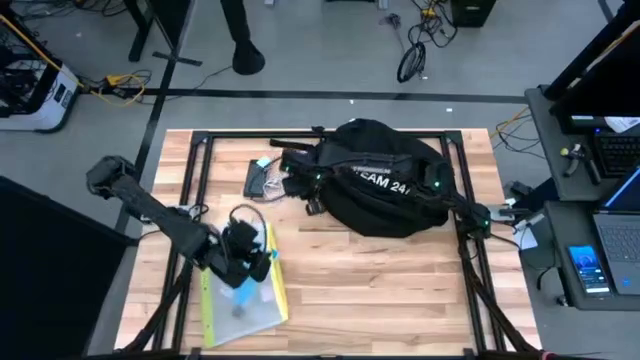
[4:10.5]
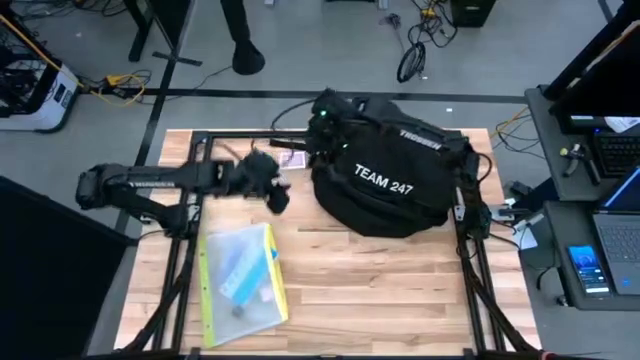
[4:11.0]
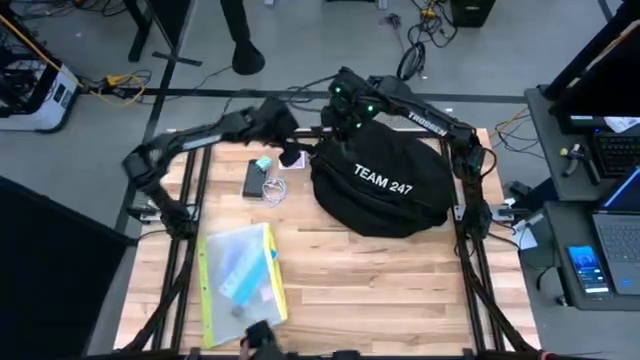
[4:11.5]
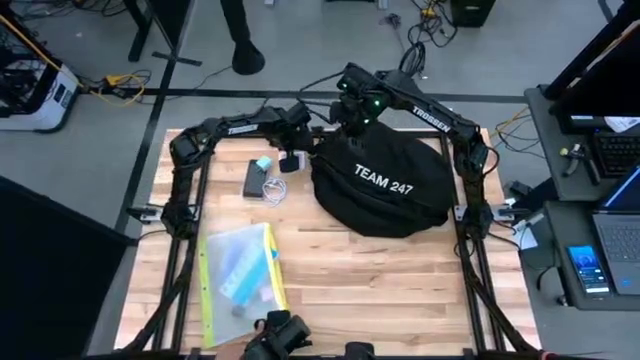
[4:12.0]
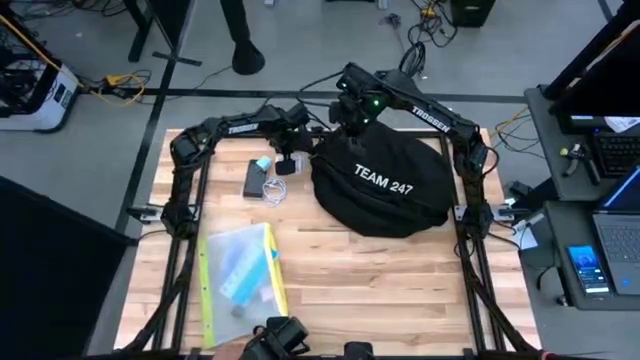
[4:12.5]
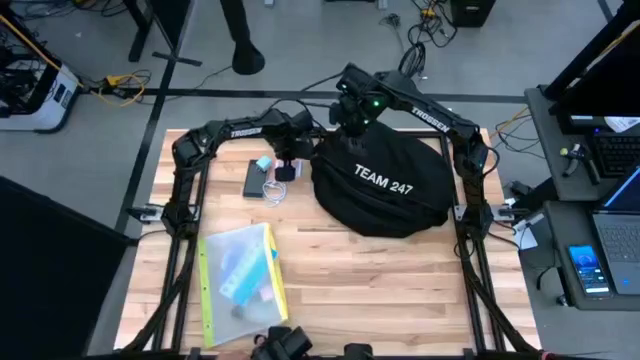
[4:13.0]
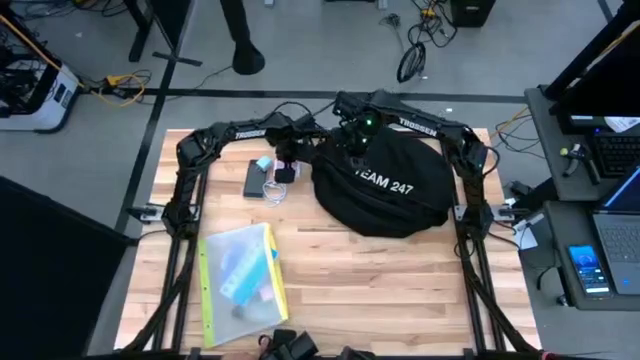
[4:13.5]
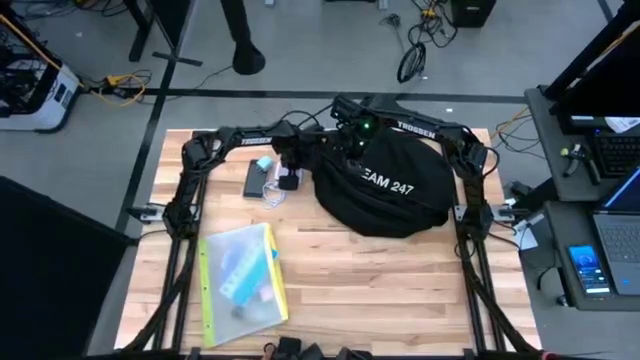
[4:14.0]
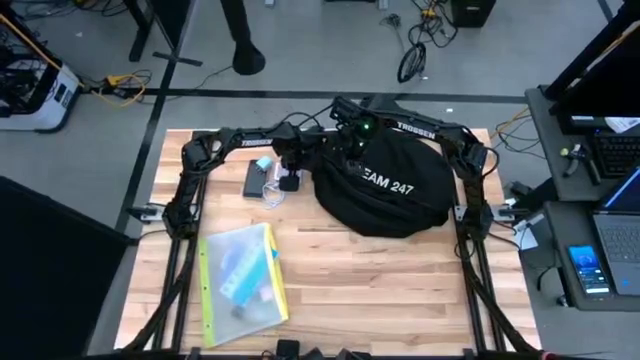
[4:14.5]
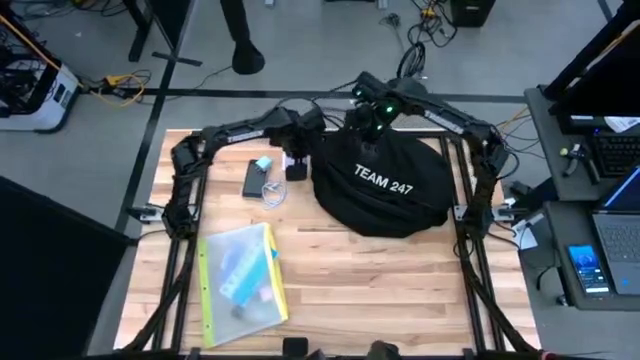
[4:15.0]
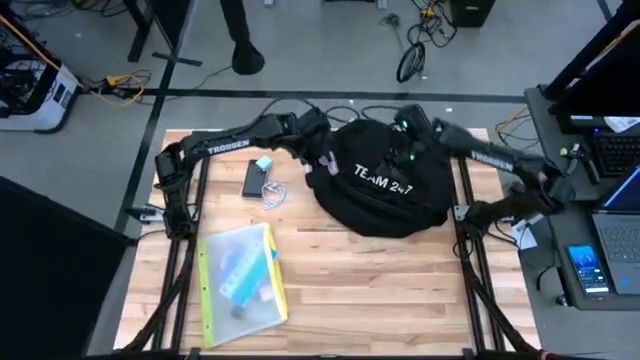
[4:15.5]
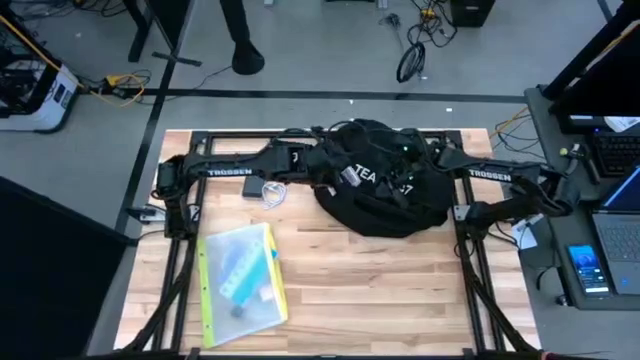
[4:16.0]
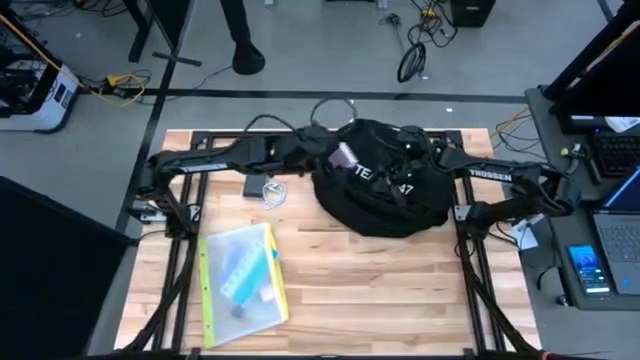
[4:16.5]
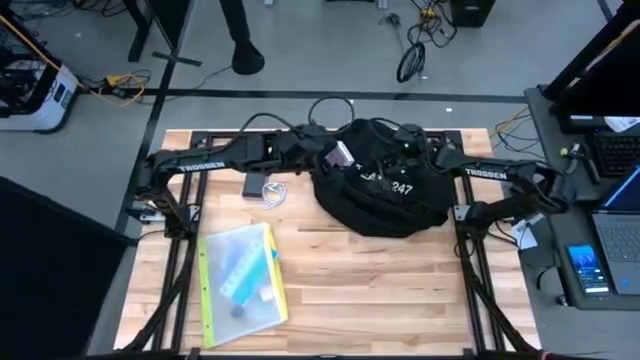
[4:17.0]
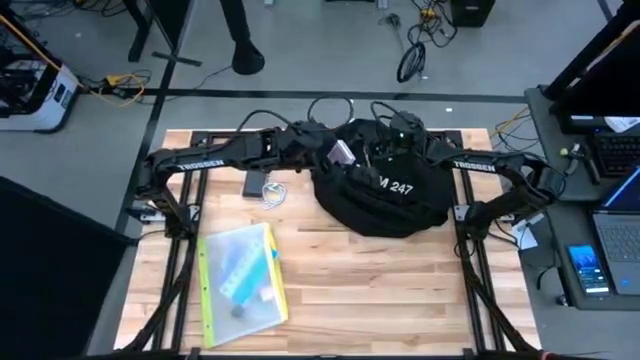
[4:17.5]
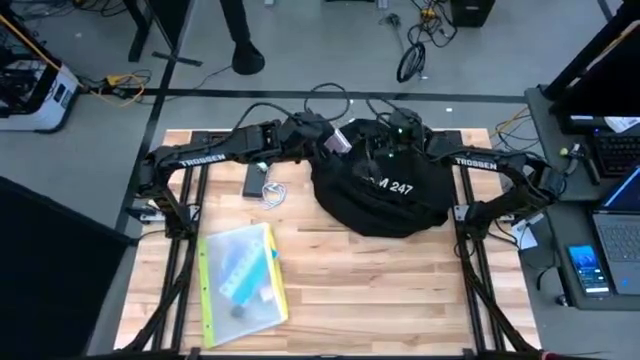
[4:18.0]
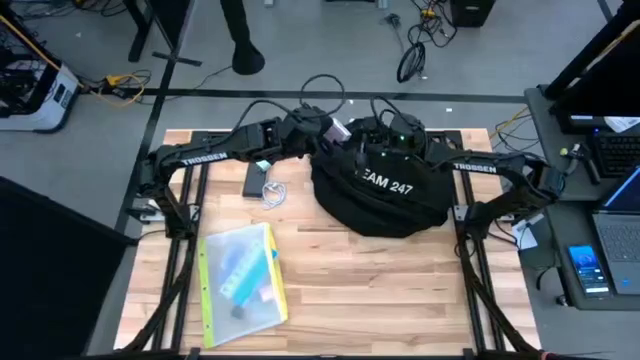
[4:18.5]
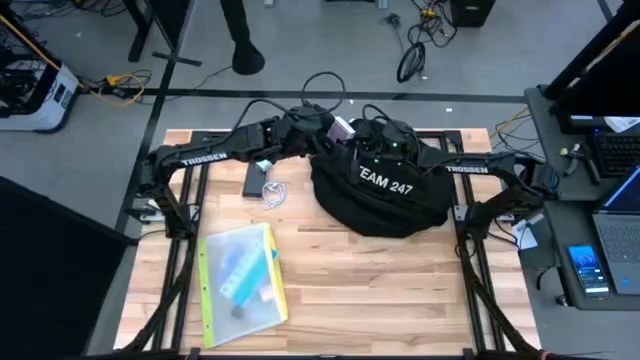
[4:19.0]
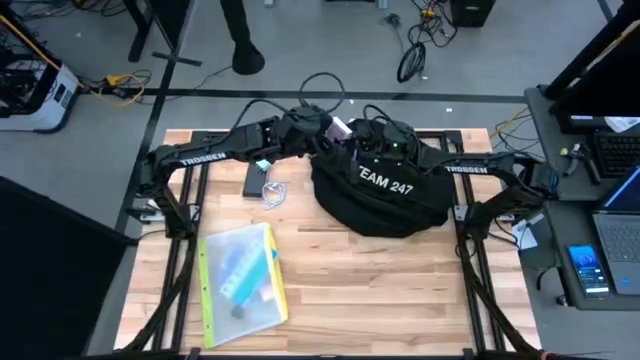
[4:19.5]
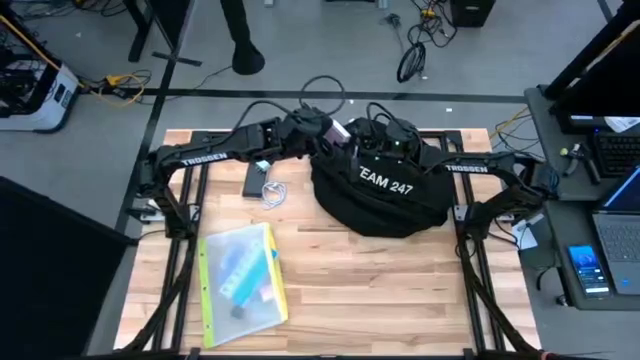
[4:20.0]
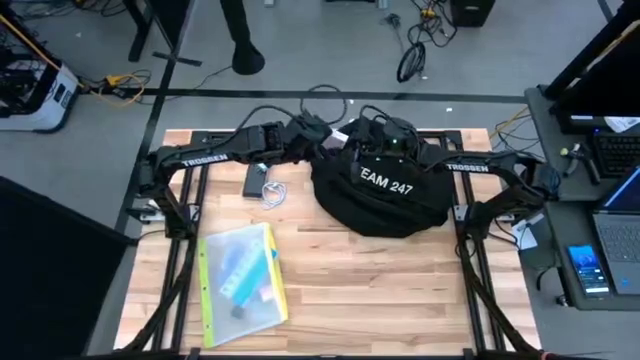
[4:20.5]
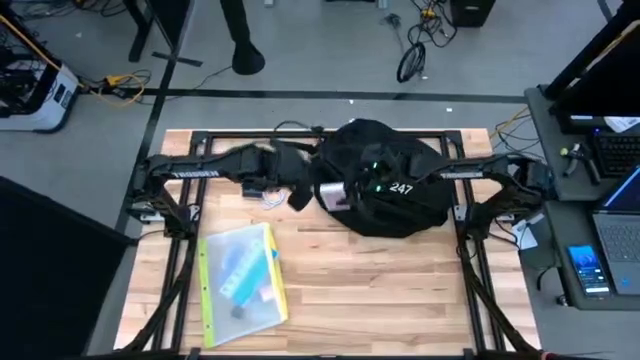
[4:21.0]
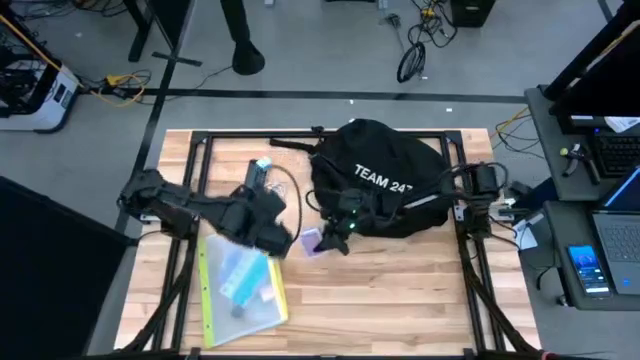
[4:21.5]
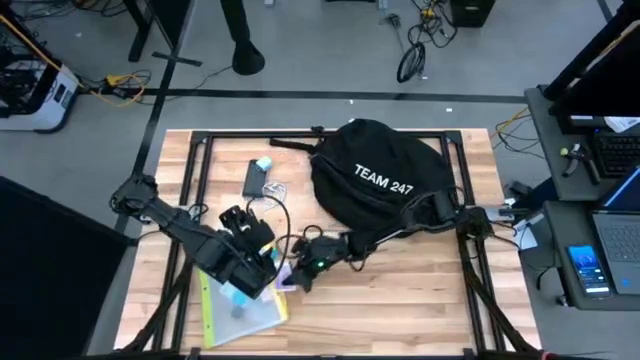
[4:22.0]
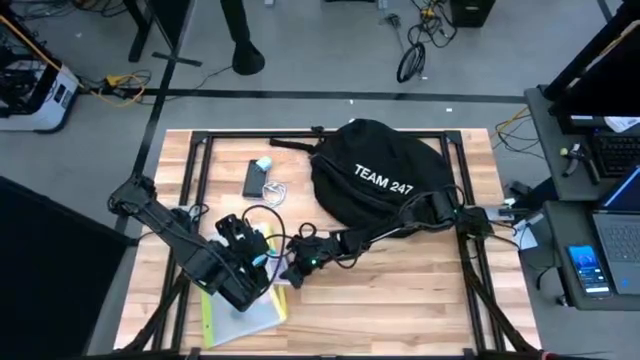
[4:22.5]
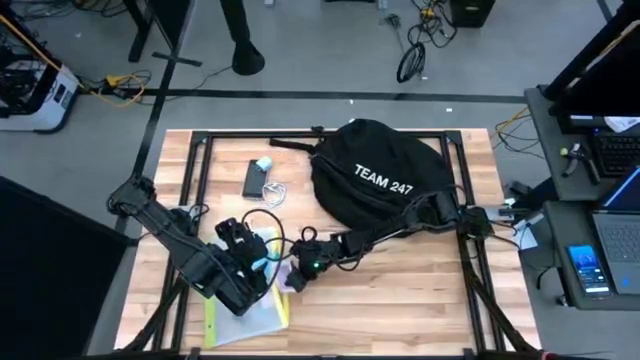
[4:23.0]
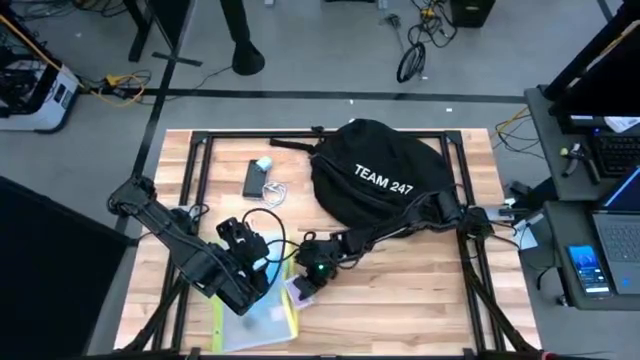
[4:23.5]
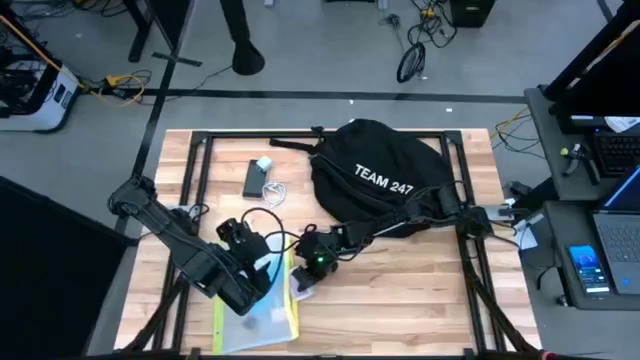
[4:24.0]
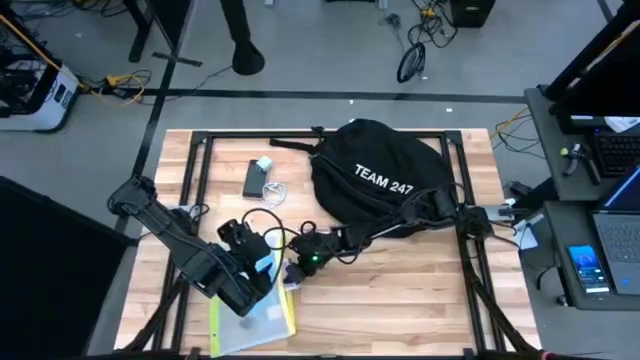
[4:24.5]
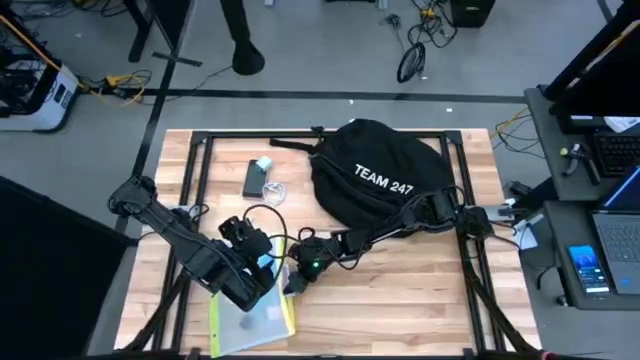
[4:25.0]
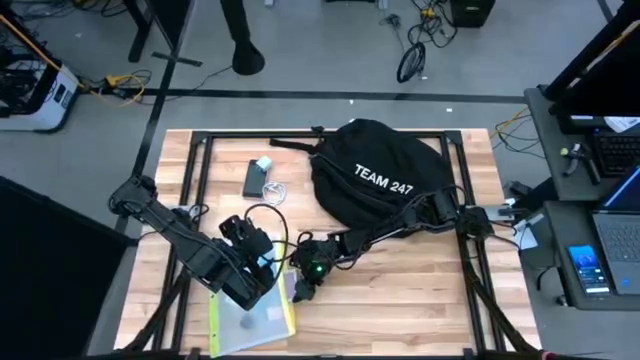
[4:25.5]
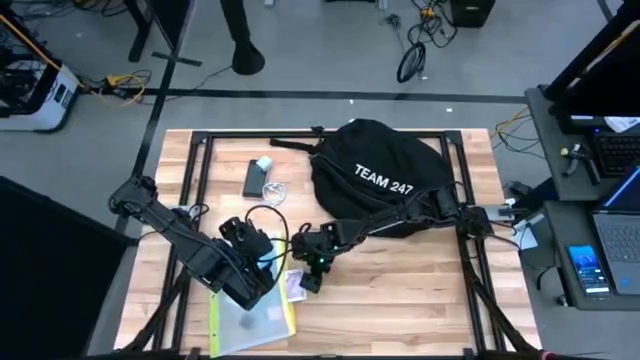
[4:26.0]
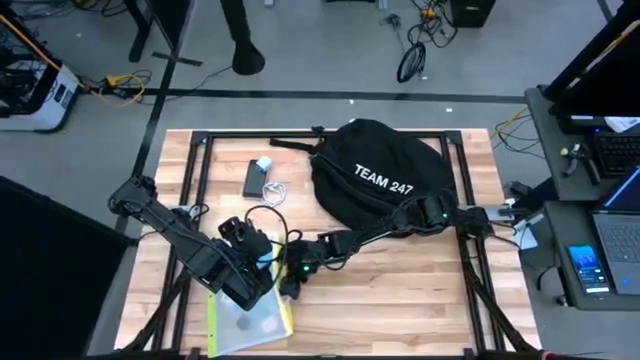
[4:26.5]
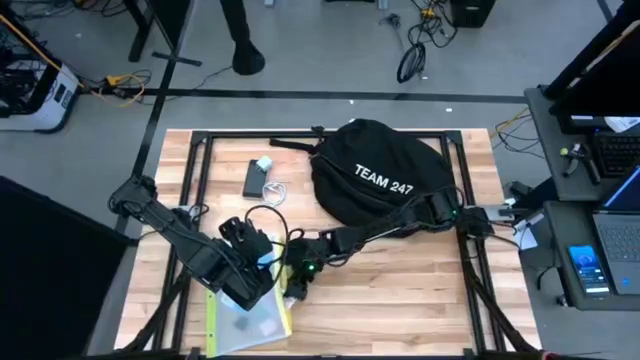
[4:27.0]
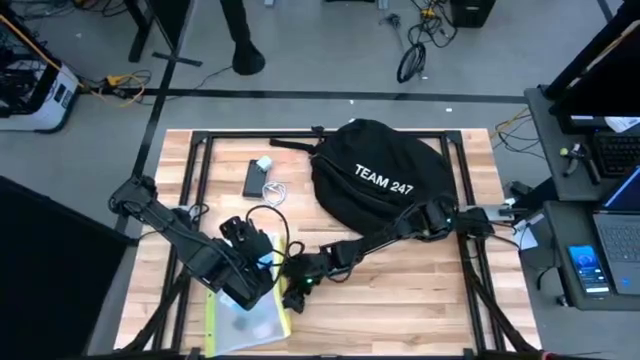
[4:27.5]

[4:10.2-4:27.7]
Task: Unpack backpack
Put the game card into the green zip bag

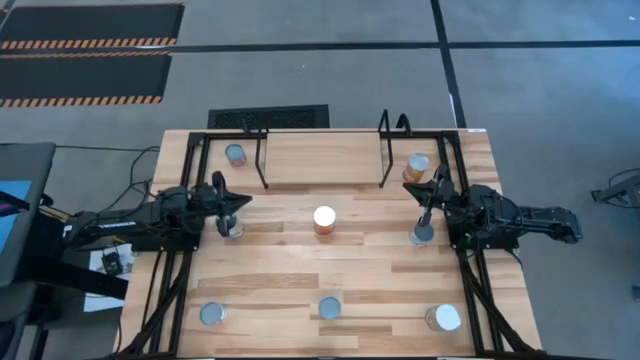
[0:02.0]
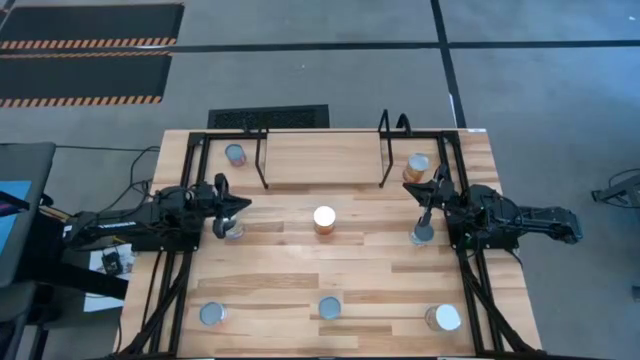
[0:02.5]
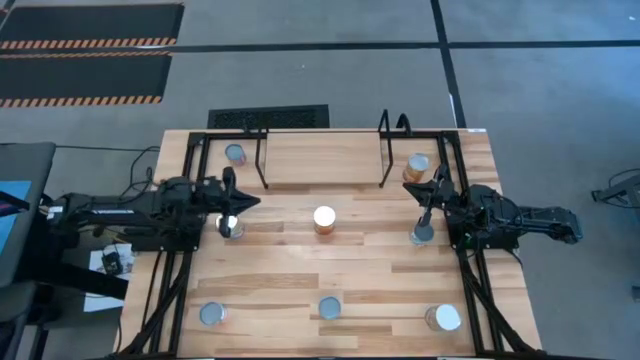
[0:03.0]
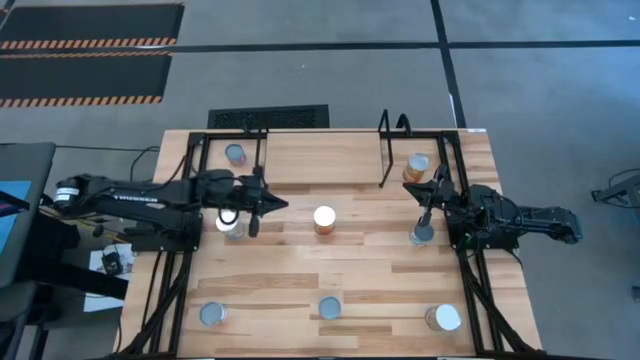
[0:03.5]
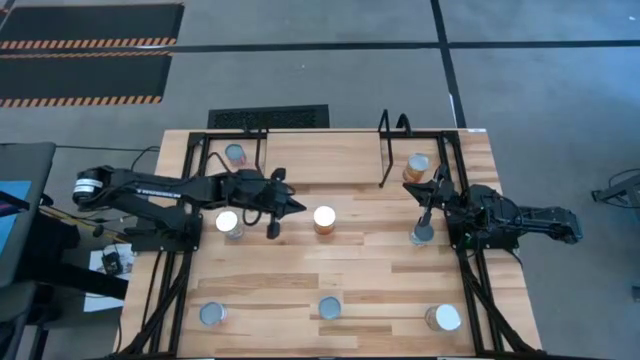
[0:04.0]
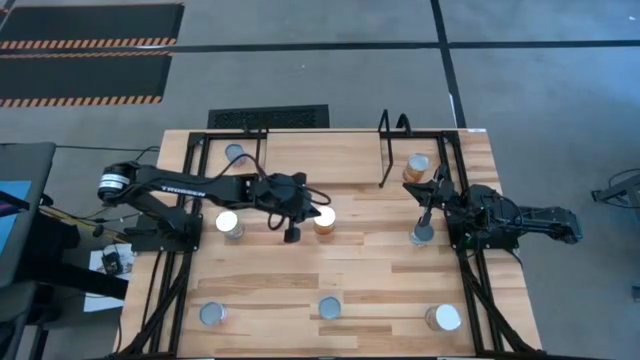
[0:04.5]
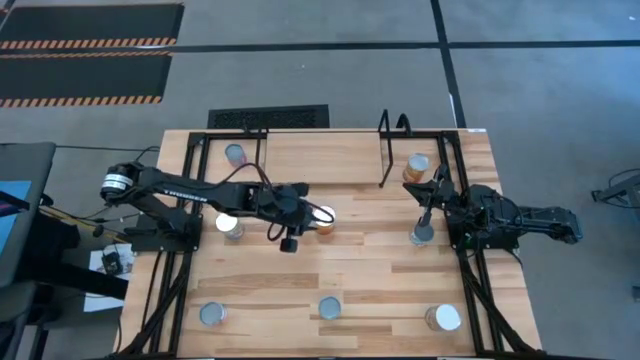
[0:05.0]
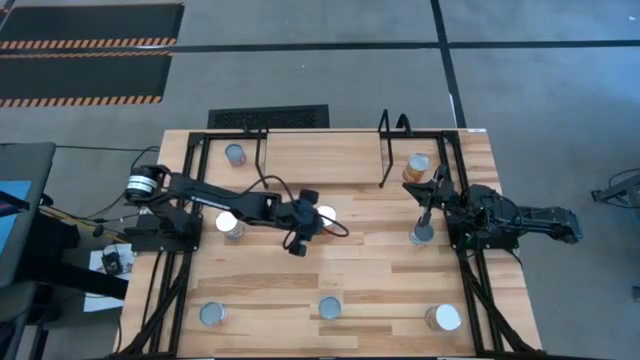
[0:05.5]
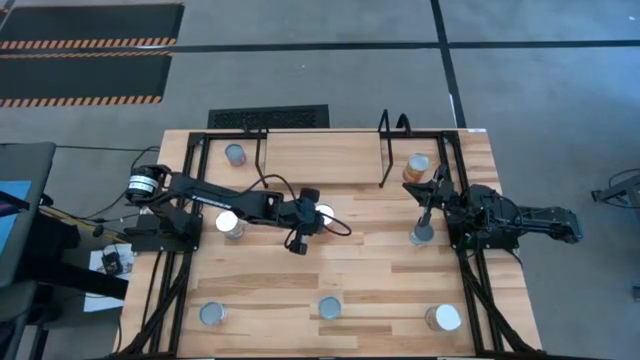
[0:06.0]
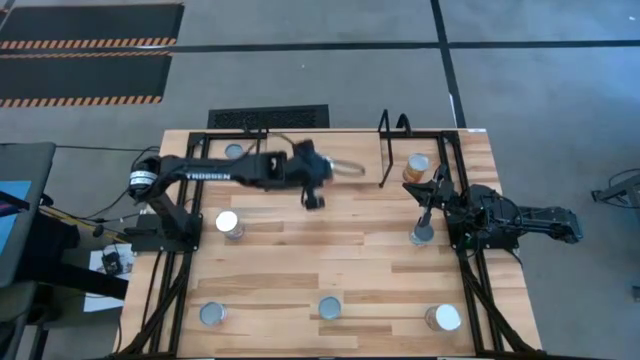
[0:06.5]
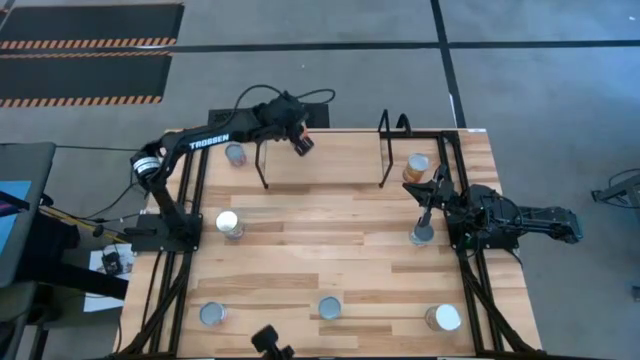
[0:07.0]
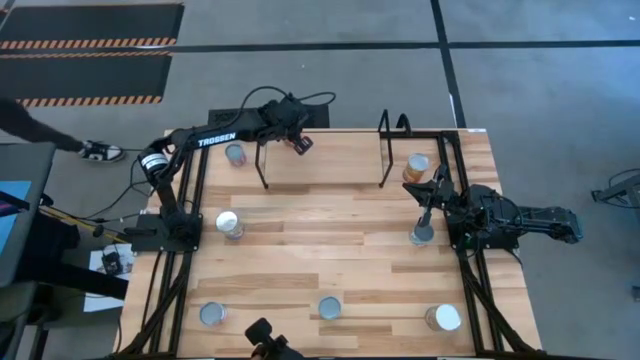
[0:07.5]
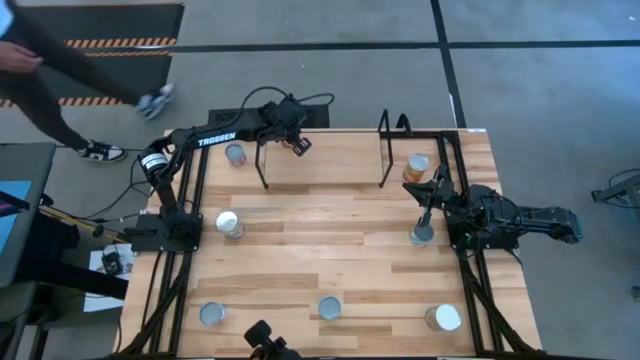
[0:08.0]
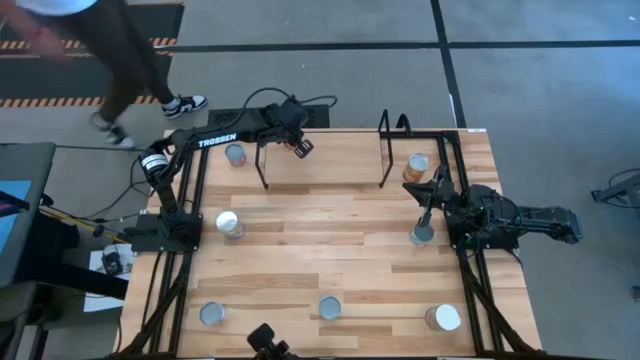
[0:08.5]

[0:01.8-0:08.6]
Task: Pick and place cans onto a shelf
Put the bottom canned corn on the shelf
